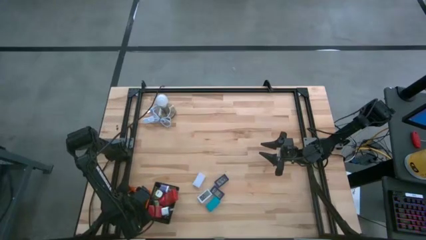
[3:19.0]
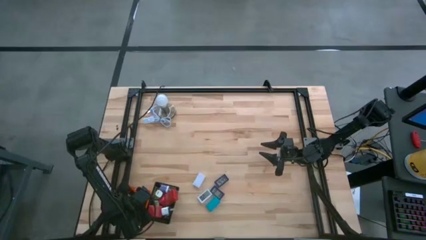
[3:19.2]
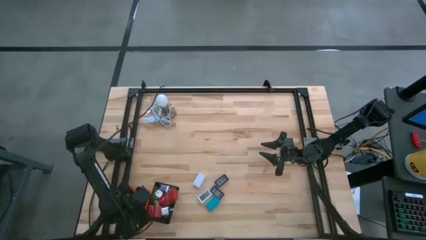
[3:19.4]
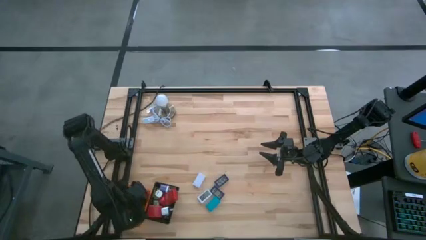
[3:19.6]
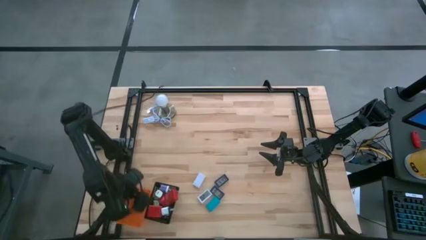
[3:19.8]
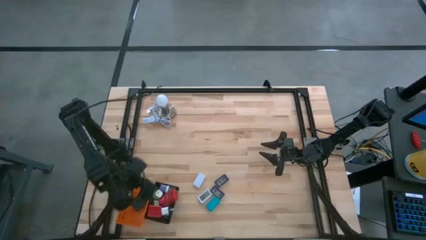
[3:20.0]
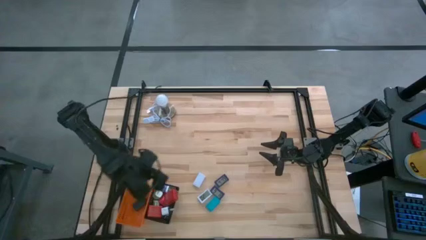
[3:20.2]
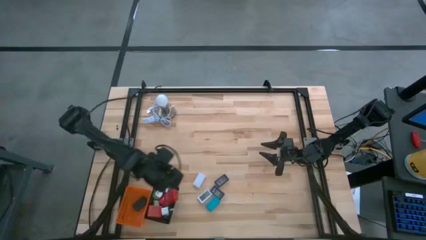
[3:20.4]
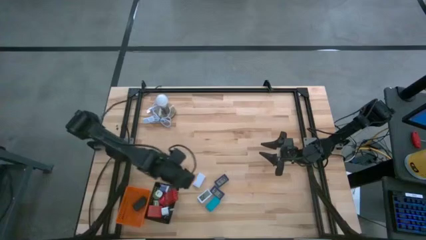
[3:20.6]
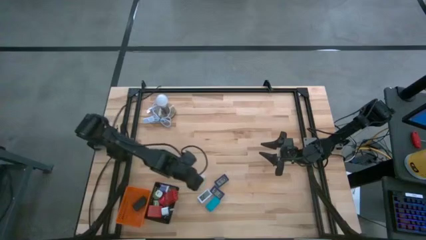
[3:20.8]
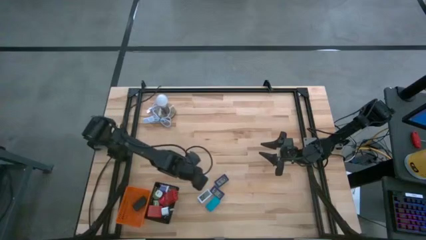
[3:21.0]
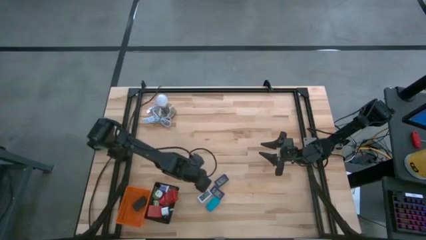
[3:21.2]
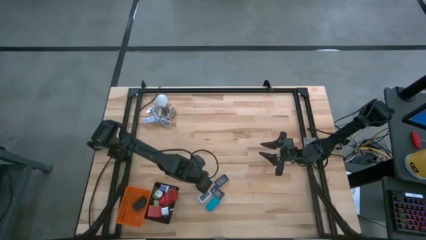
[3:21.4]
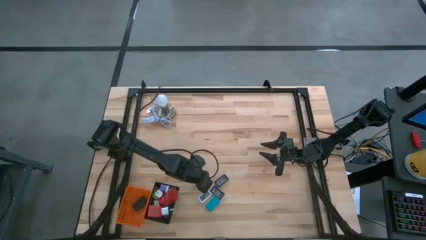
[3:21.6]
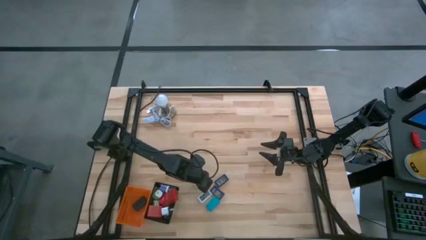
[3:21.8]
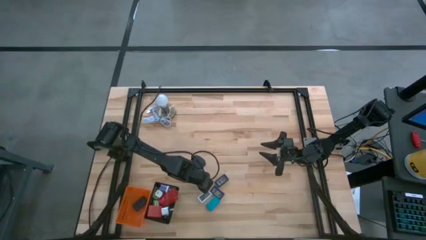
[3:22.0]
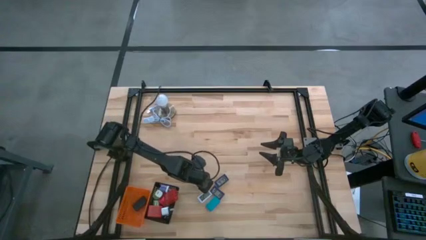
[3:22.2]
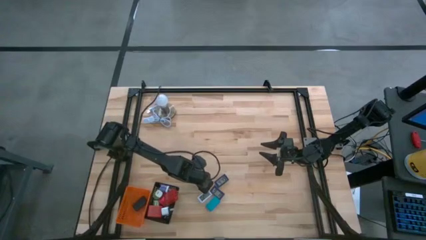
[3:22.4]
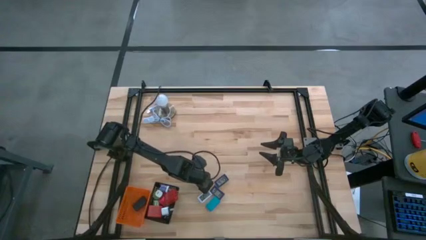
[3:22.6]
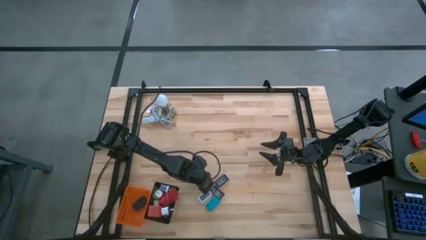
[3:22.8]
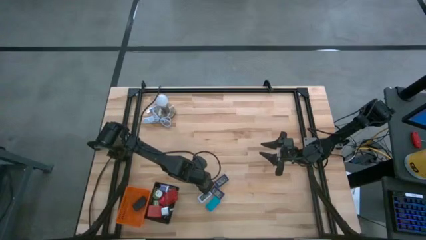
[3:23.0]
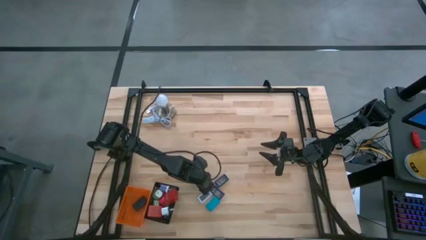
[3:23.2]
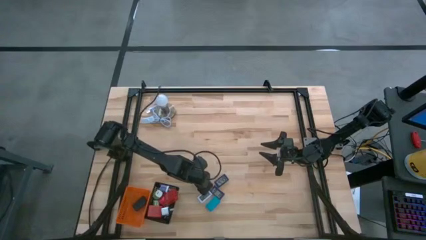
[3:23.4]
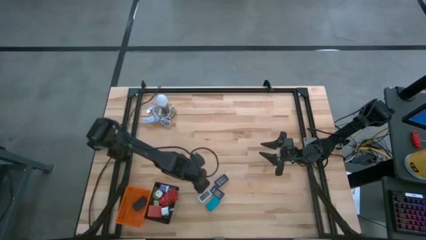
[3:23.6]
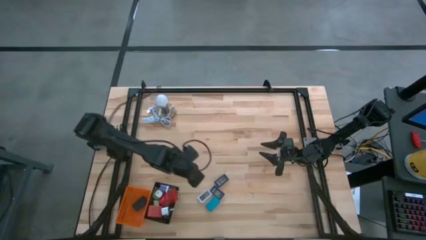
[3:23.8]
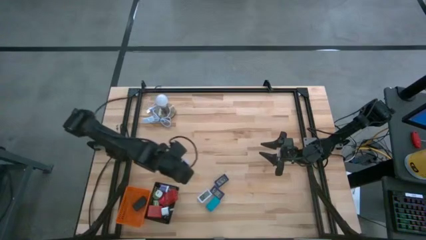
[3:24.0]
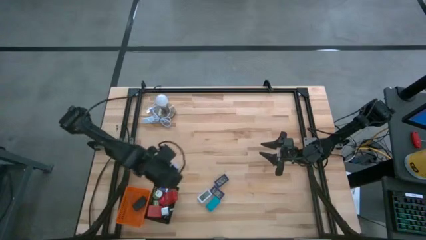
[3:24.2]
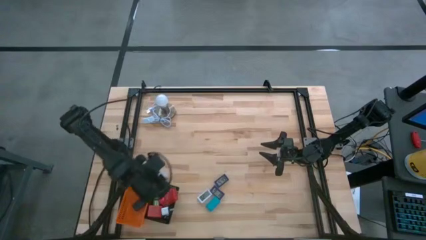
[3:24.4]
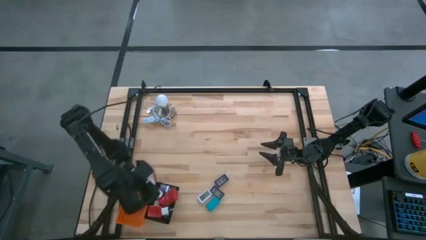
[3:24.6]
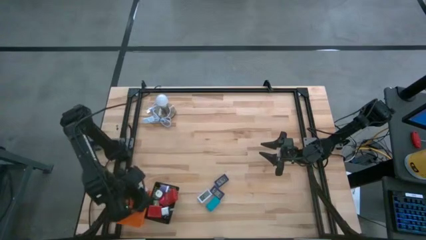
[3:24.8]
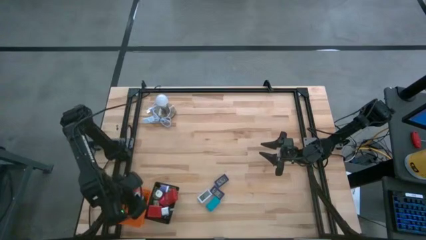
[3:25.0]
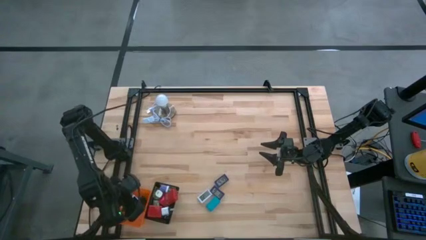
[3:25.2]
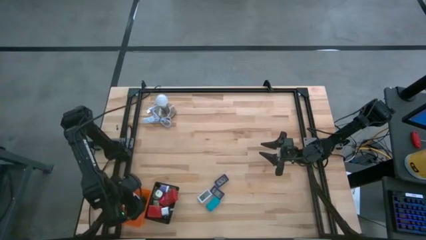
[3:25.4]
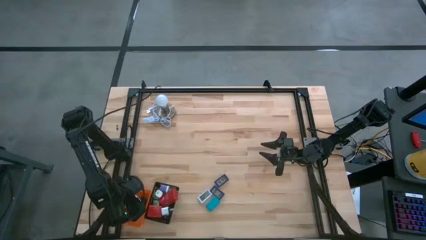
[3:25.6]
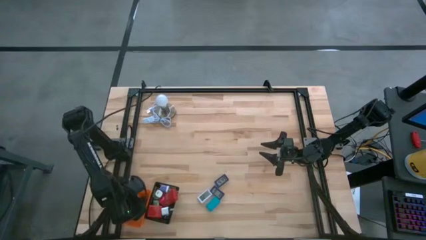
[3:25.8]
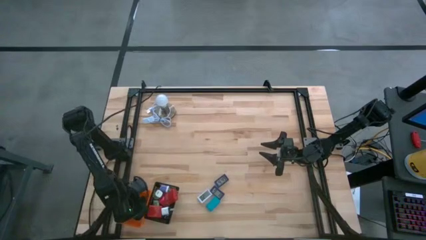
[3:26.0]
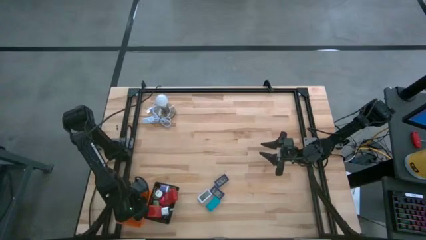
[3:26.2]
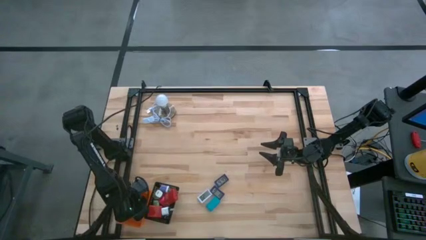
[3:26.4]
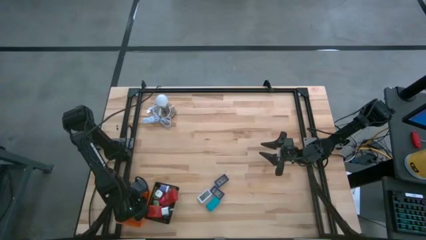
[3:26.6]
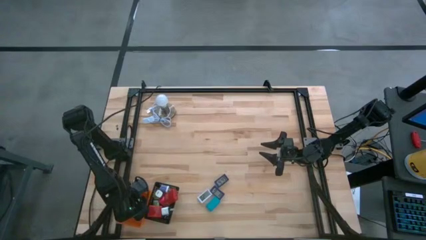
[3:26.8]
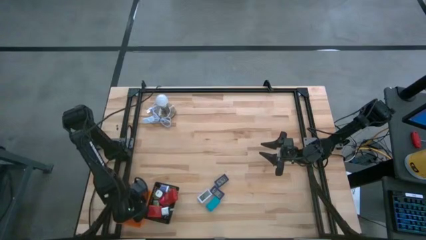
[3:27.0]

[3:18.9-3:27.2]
Task: Pick & Place Office items
Put the top white digital clock into the orange basket

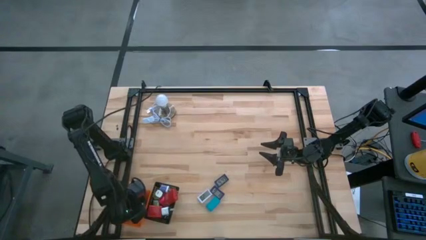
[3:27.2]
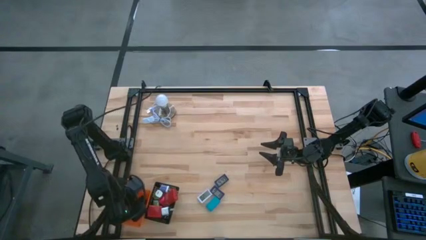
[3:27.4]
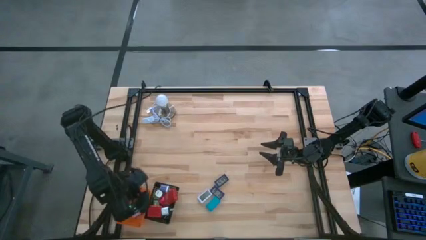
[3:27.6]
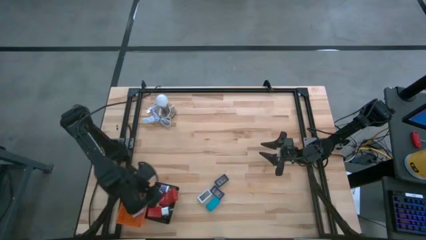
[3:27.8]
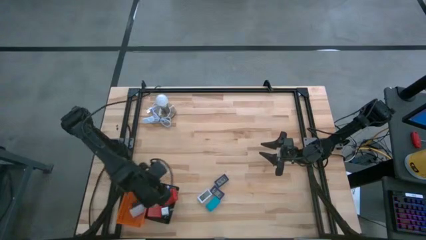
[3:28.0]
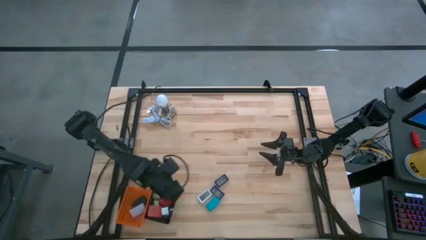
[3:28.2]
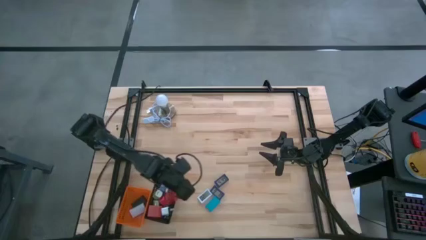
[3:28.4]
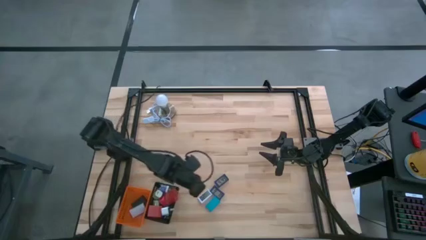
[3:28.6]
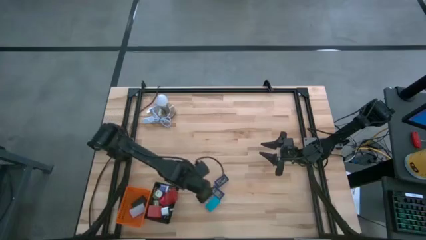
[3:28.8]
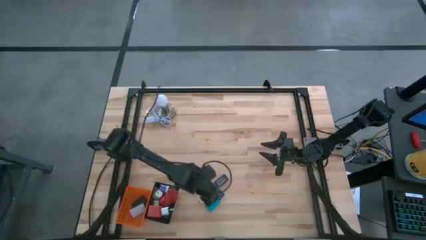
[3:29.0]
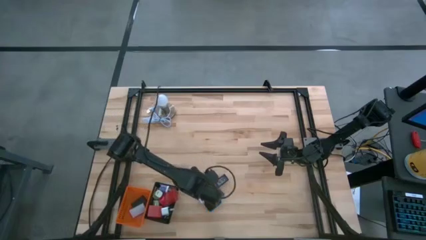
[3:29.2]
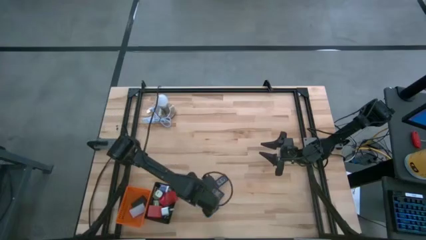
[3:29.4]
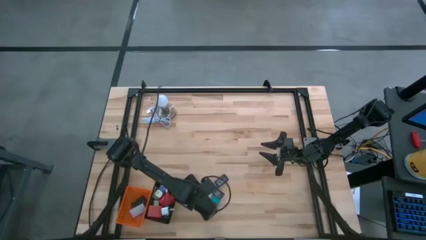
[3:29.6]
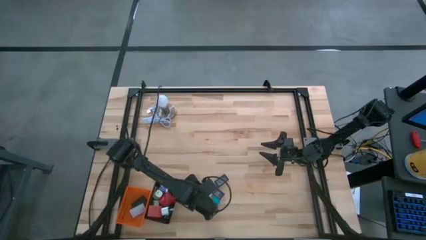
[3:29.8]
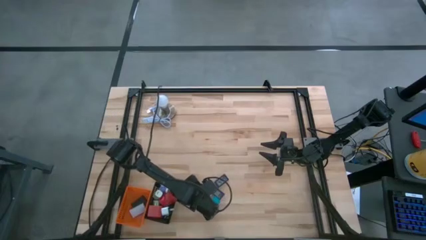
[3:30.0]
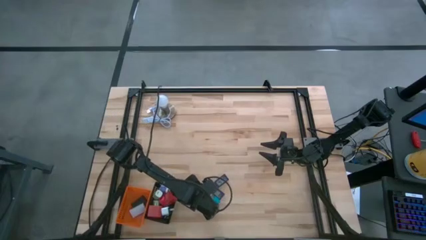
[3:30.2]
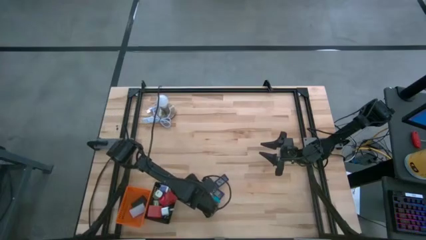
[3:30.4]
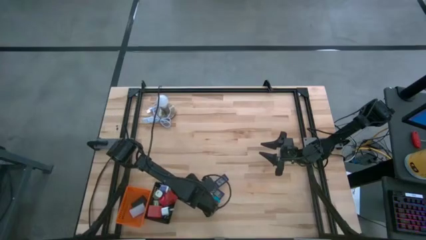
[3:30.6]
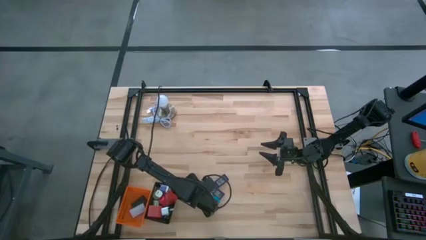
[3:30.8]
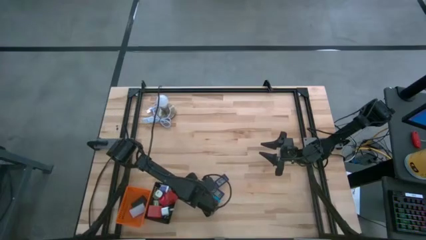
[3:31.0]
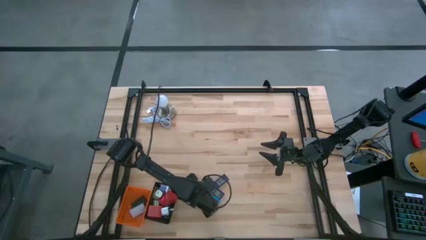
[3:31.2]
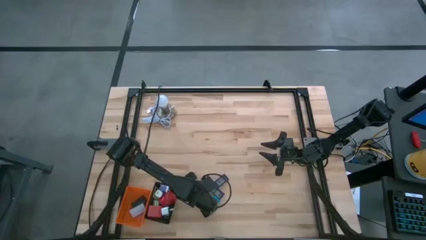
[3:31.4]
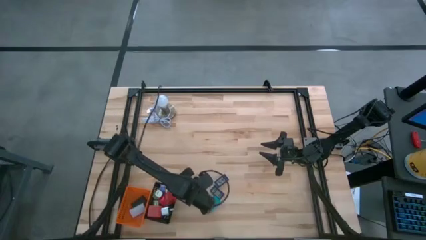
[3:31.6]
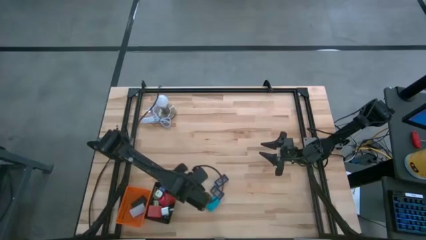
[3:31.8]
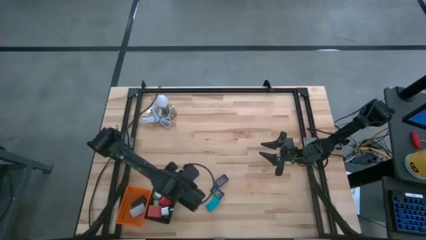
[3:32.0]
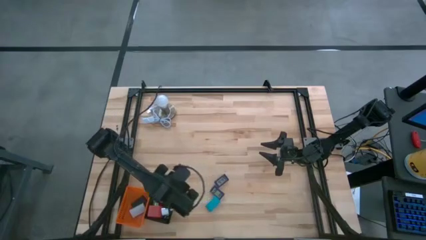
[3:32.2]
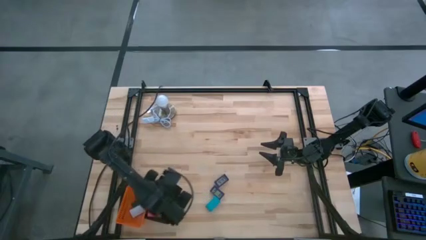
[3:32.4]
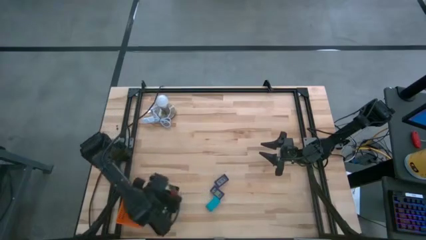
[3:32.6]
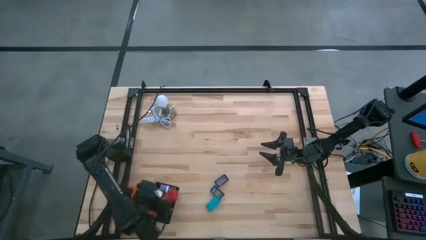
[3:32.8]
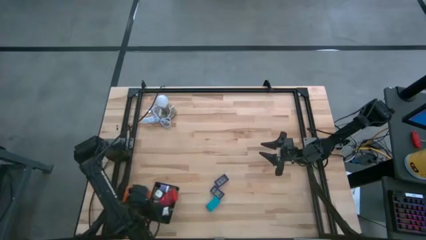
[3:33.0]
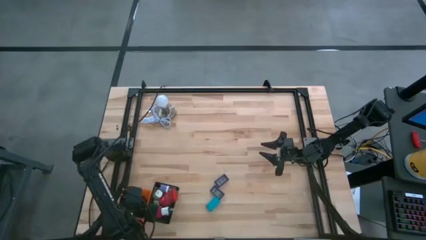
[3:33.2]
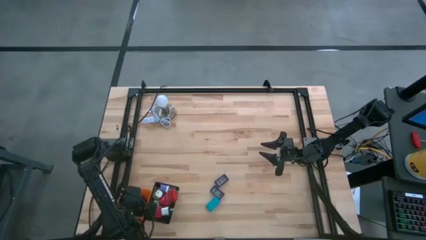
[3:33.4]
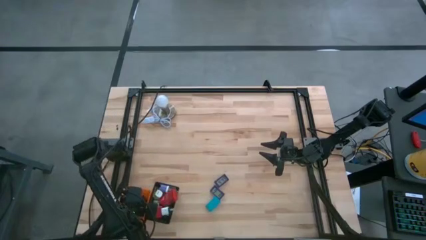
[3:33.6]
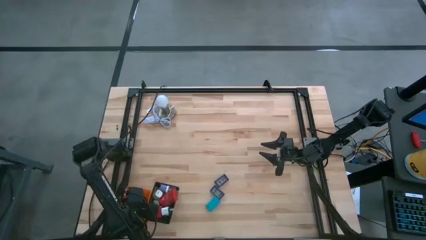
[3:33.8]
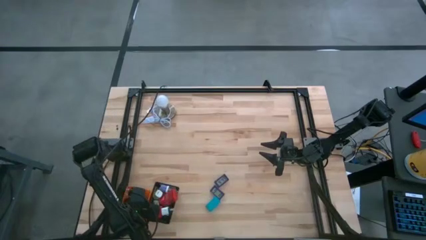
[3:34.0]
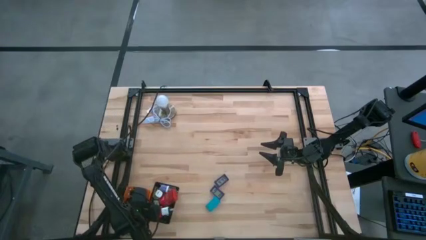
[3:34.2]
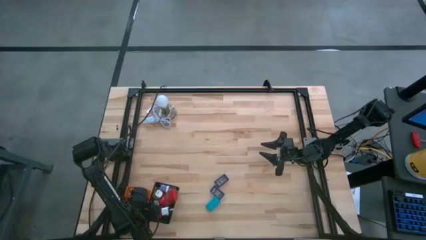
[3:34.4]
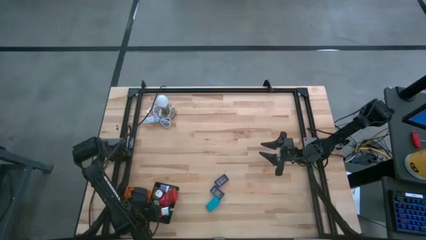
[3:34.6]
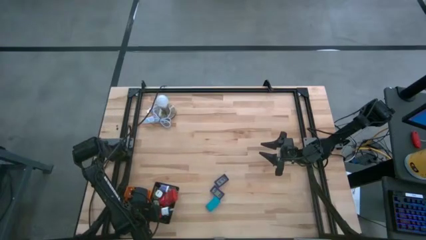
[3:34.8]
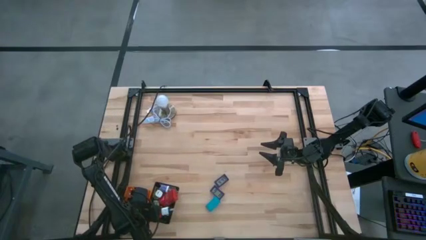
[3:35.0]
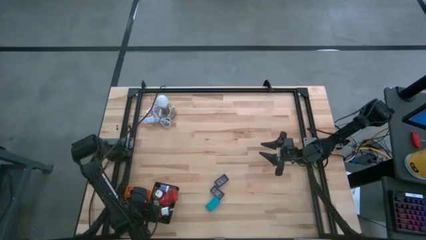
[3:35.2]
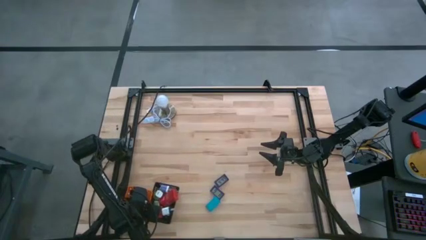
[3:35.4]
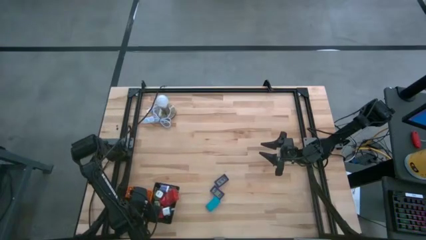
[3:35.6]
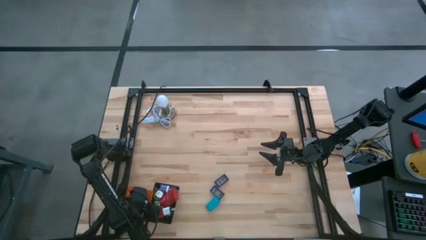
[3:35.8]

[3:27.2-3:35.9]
Put the white digital clock into the orange basket
